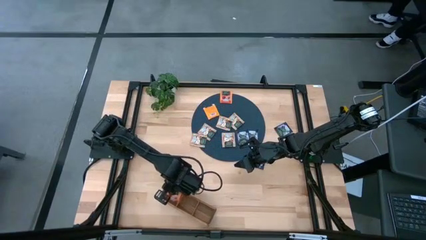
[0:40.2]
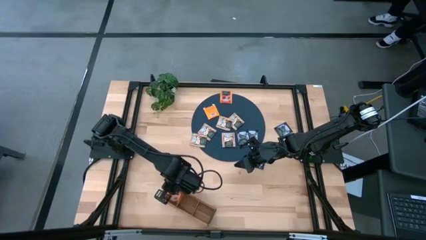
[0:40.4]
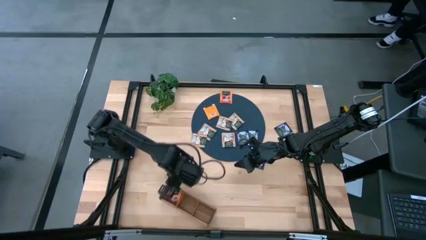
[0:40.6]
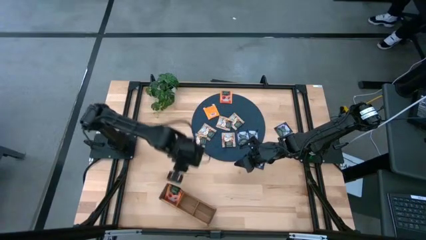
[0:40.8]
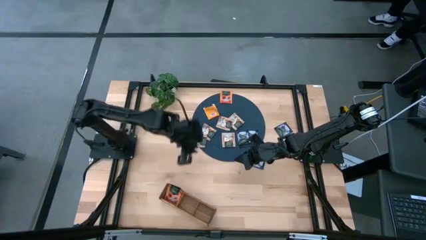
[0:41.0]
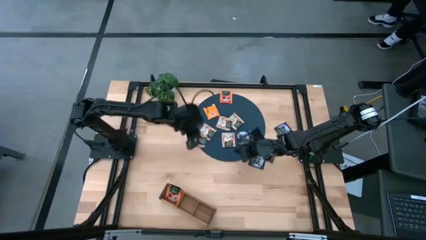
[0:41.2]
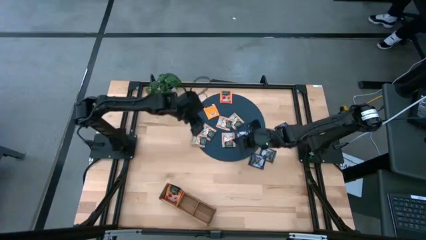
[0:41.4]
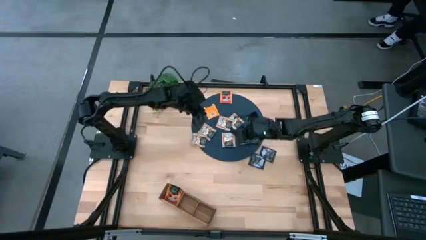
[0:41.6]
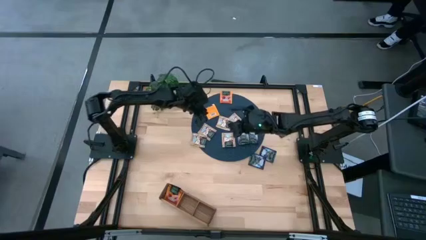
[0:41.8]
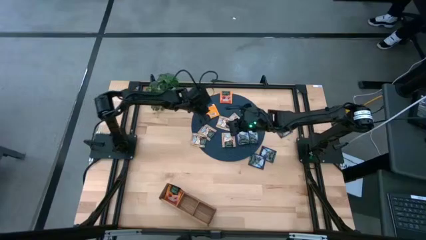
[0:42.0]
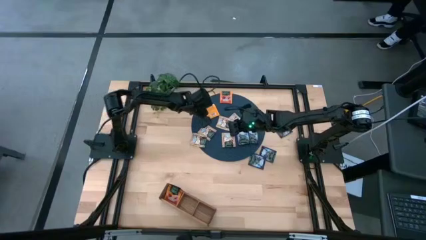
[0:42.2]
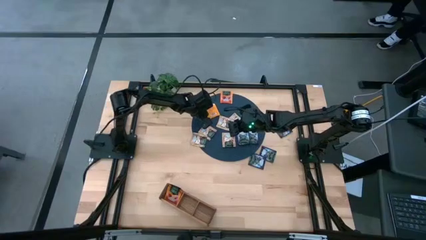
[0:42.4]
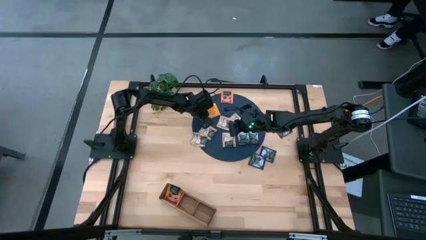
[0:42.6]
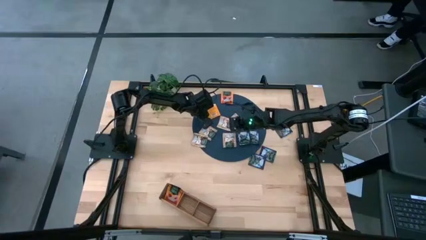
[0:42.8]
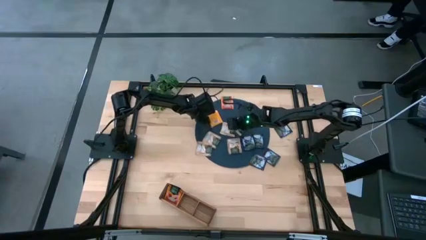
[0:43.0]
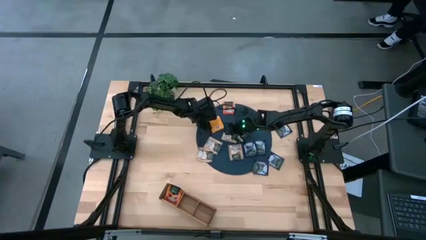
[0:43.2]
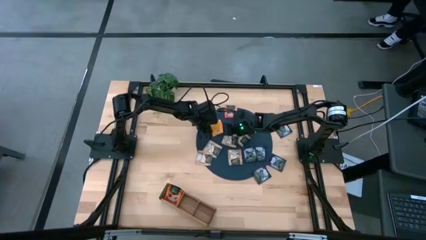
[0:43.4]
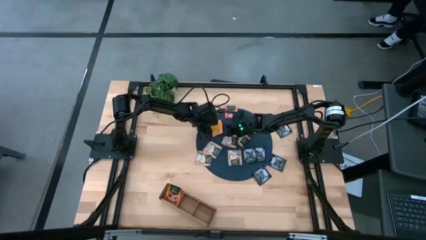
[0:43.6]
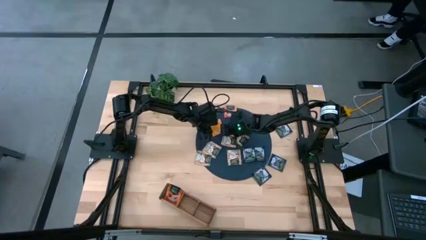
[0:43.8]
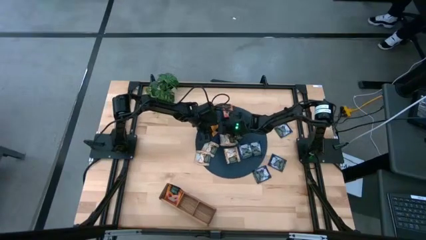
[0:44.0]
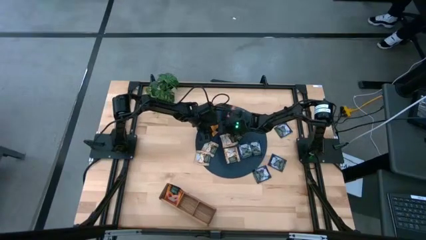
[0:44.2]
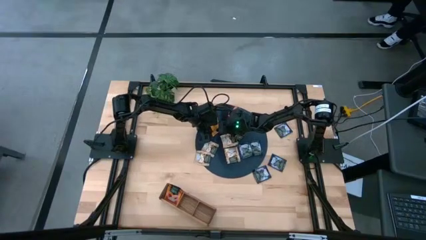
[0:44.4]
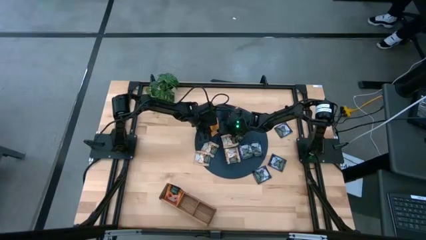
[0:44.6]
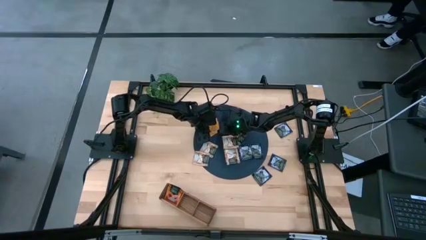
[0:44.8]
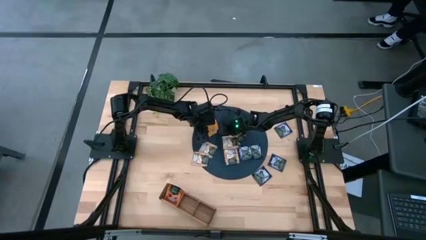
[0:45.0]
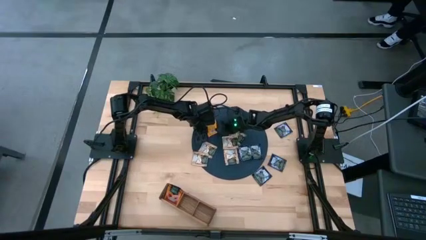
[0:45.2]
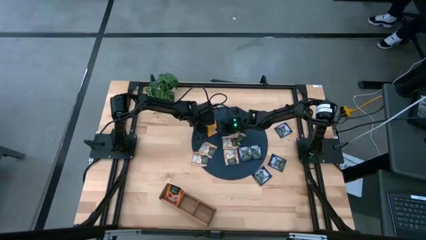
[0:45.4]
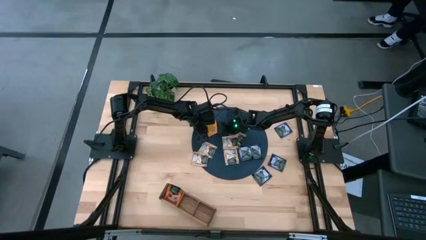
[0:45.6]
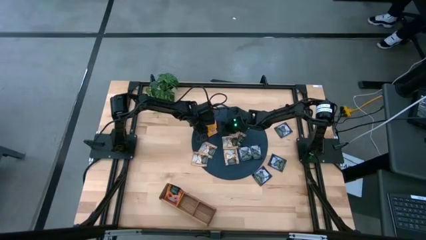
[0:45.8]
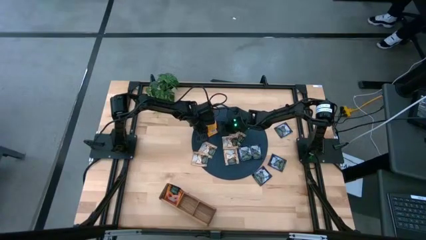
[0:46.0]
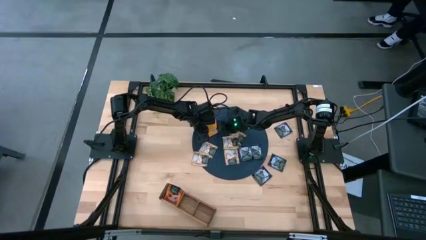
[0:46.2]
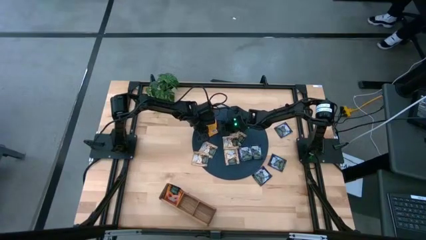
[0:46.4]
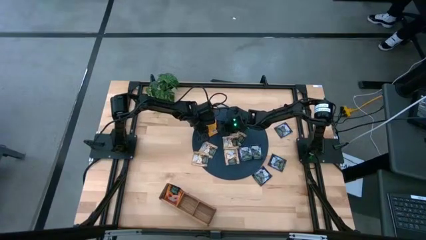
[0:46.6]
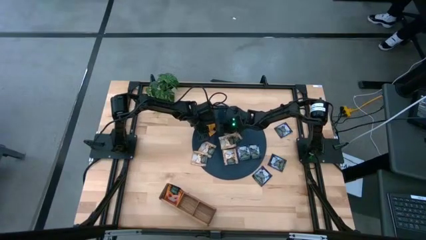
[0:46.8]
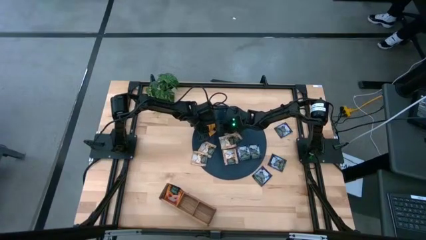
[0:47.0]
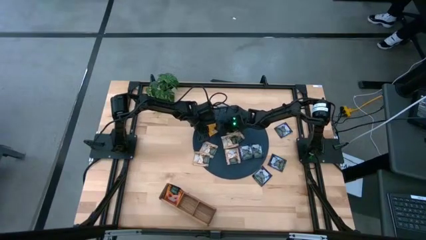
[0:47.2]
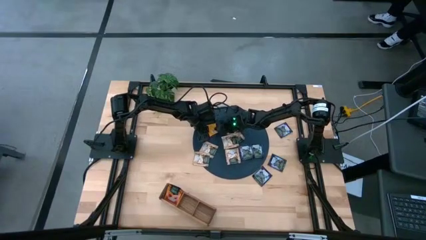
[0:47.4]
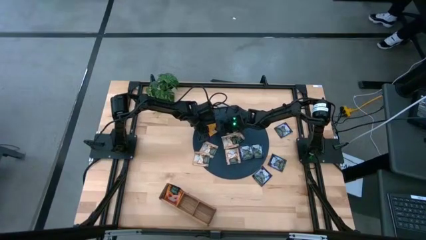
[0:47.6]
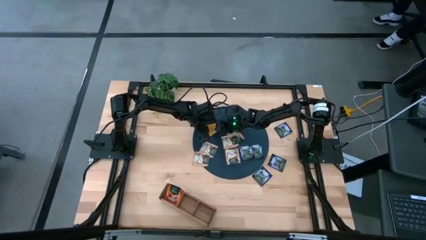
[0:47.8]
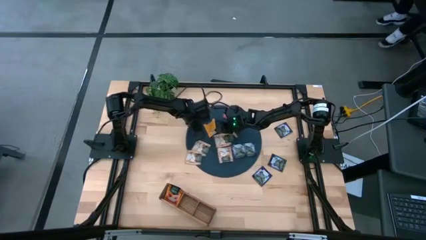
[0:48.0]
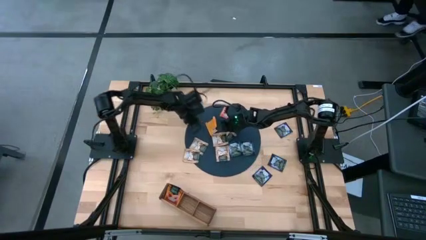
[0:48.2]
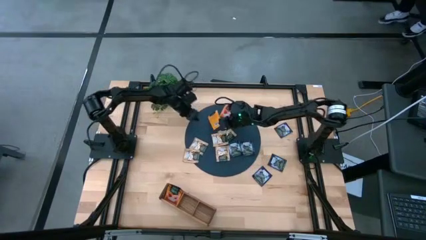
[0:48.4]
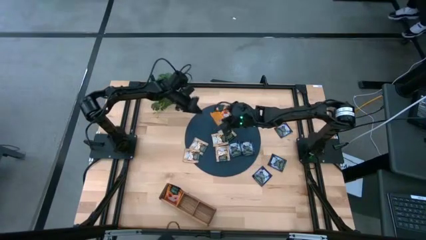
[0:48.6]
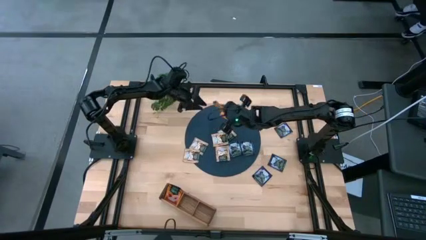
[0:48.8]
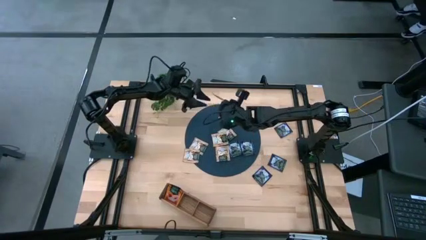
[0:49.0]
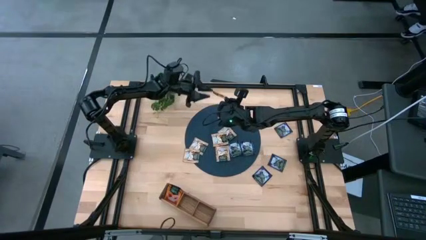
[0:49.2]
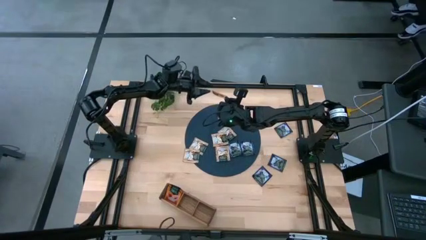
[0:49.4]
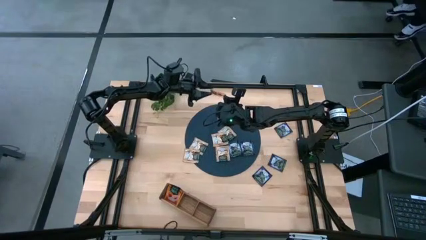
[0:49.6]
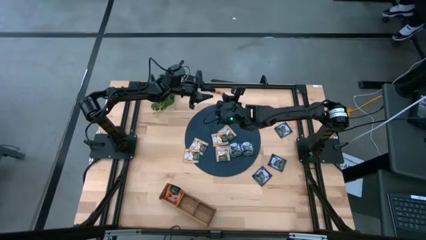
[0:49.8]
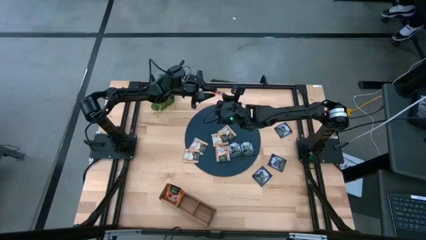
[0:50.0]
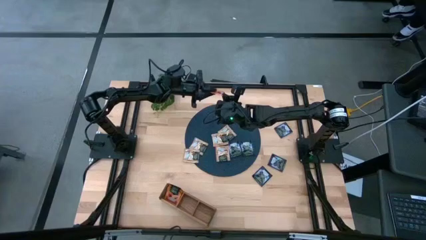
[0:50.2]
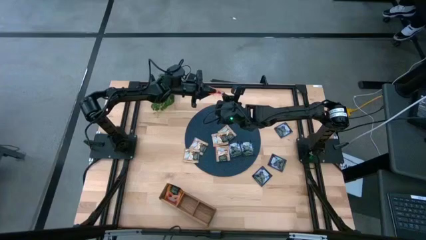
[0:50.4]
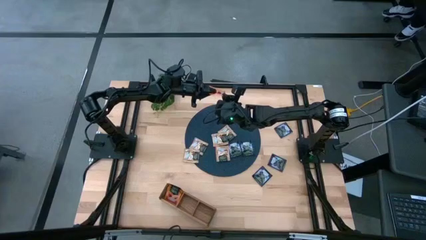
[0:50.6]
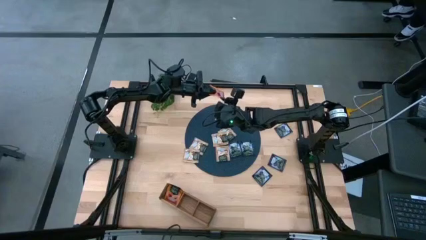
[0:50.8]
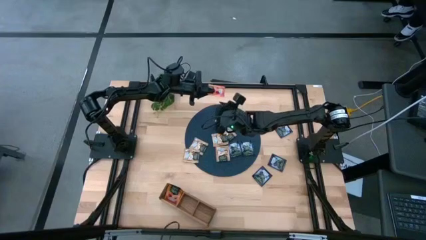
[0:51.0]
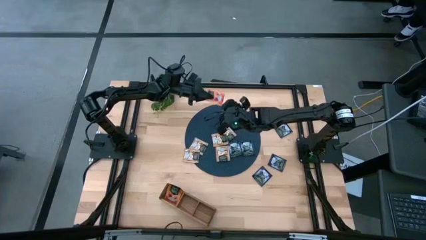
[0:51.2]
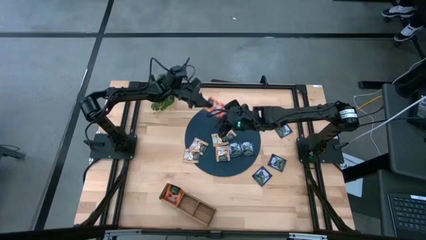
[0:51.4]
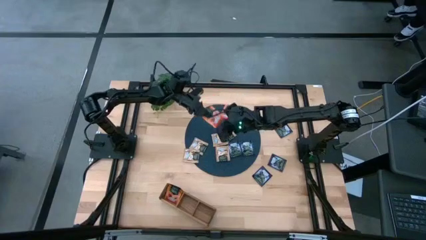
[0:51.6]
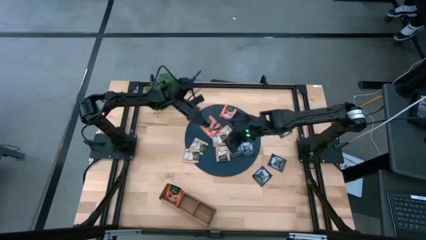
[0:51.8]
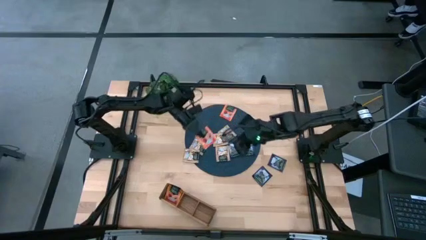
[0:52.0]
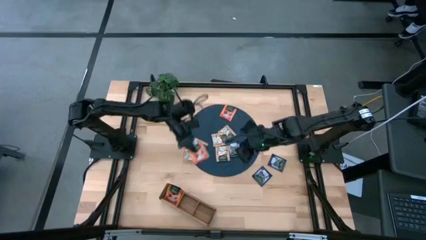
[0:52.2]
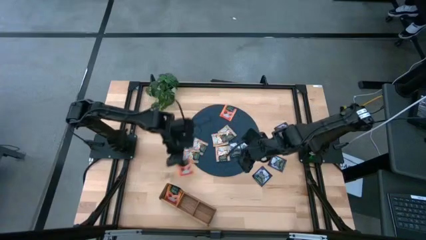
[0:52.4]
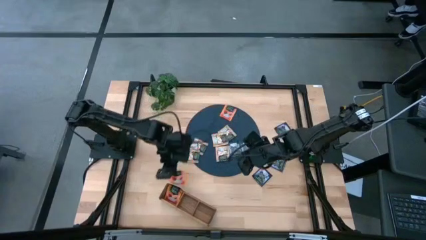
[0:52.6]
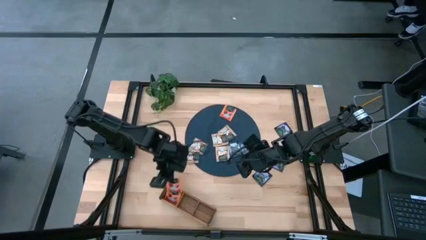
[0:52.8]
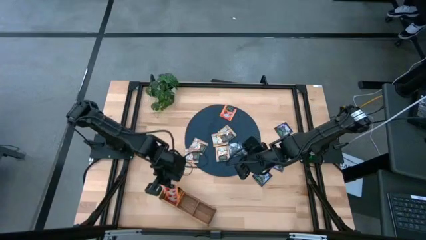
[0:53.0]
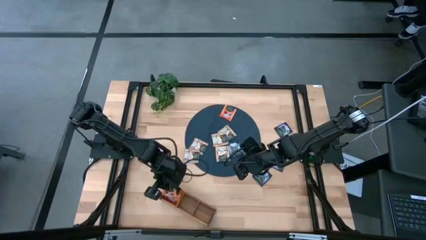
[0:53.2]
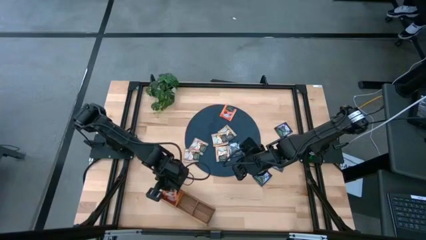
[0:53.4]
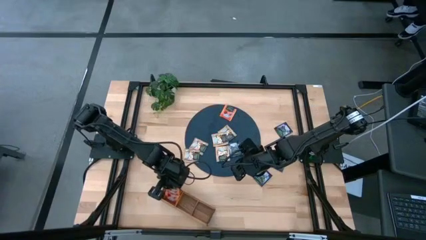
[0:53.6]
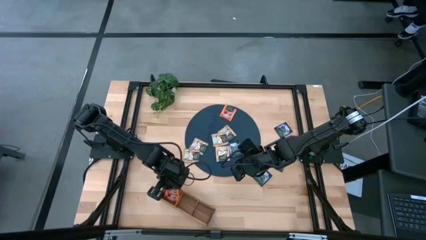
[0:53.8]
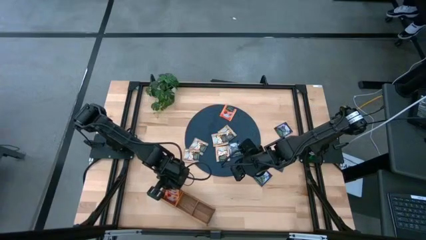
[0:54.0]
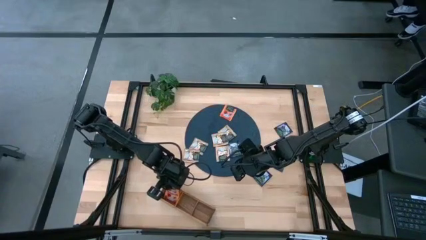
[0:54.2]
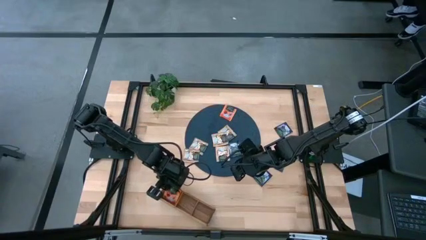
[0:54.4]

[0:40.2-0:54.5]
Task: Pick & Place Tea
Put the orange tea bag into the left section of the wooden organizer
